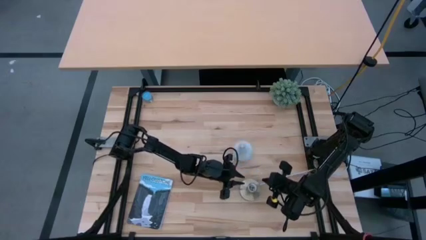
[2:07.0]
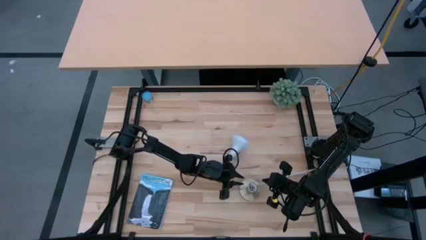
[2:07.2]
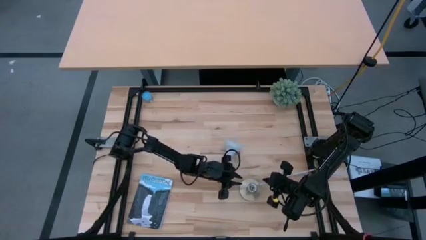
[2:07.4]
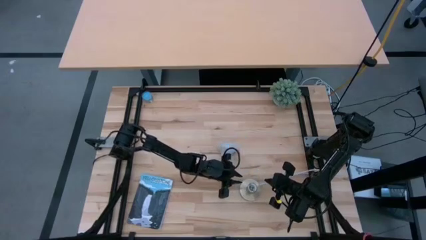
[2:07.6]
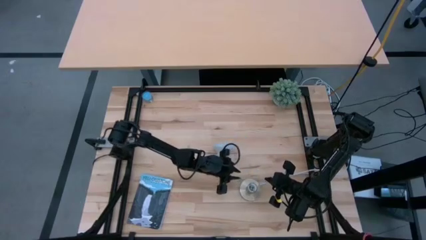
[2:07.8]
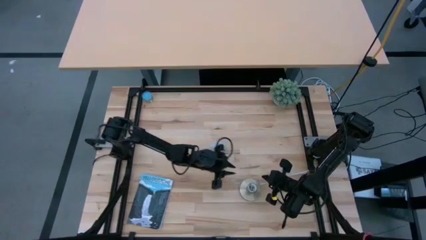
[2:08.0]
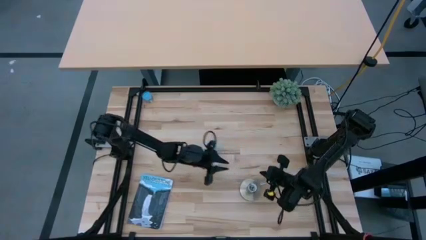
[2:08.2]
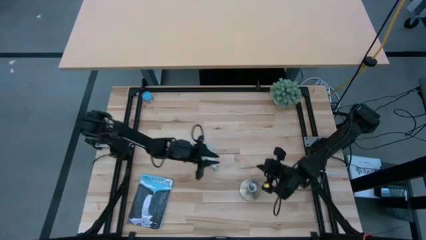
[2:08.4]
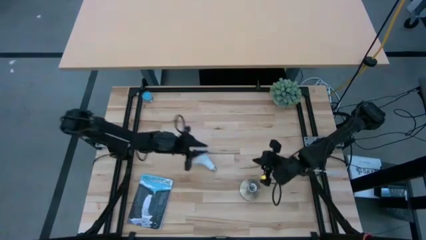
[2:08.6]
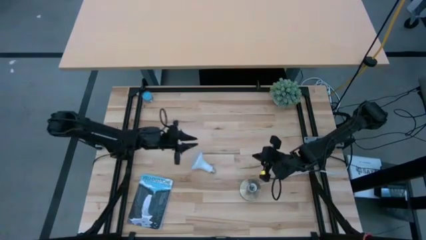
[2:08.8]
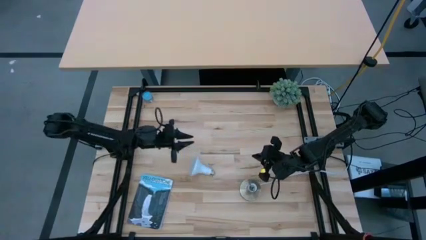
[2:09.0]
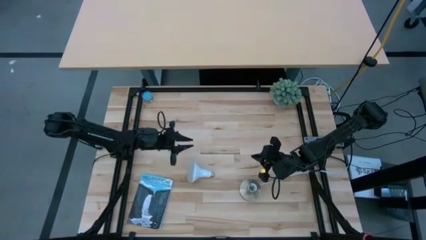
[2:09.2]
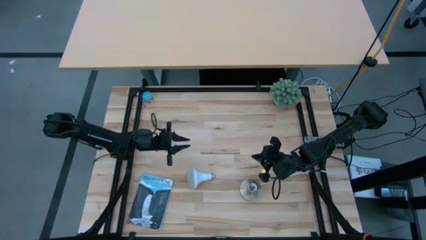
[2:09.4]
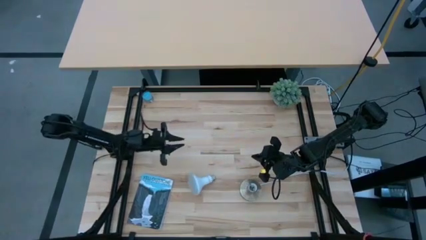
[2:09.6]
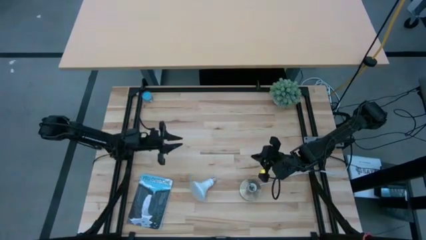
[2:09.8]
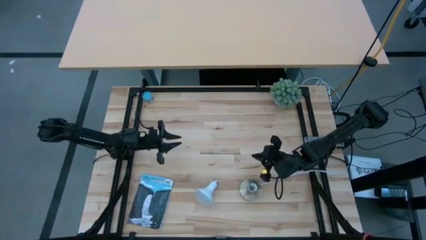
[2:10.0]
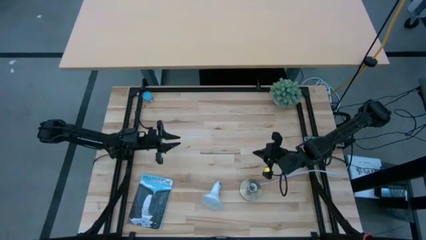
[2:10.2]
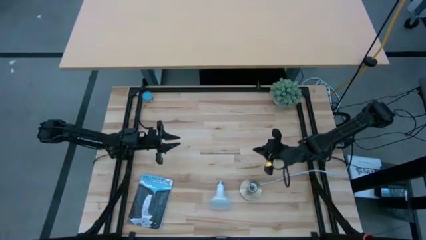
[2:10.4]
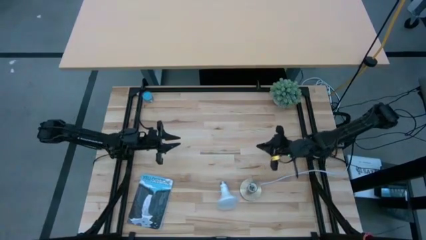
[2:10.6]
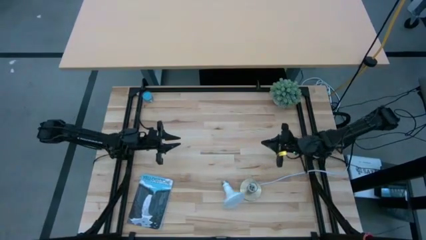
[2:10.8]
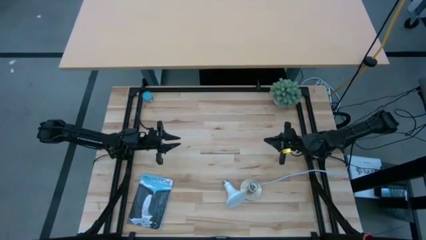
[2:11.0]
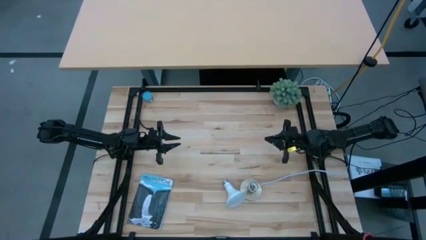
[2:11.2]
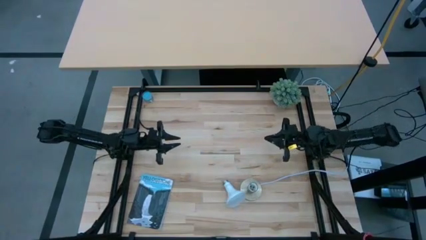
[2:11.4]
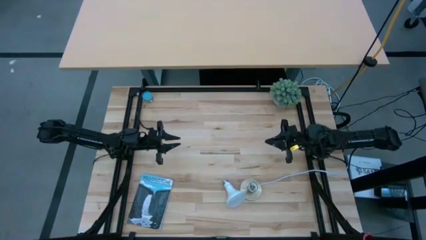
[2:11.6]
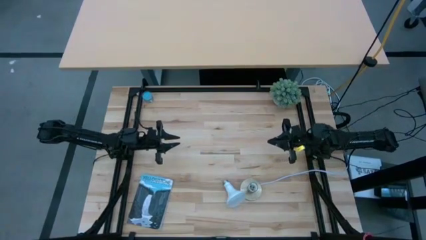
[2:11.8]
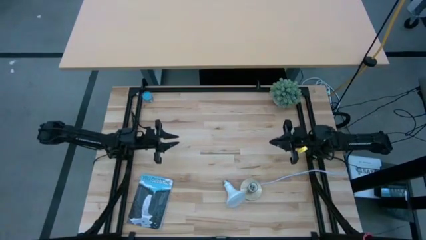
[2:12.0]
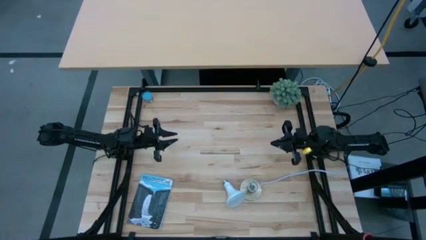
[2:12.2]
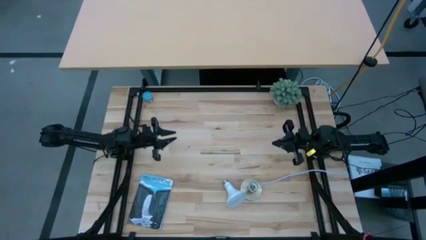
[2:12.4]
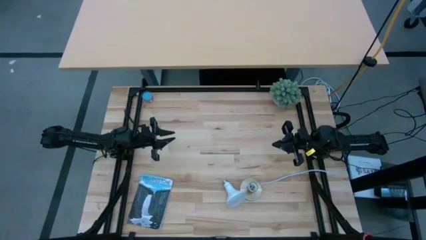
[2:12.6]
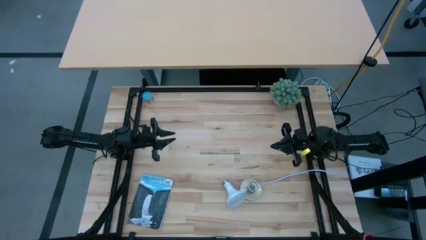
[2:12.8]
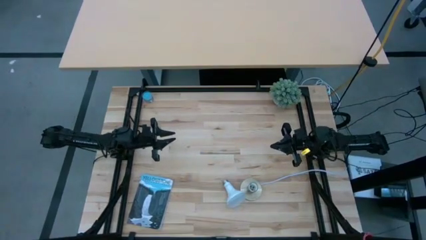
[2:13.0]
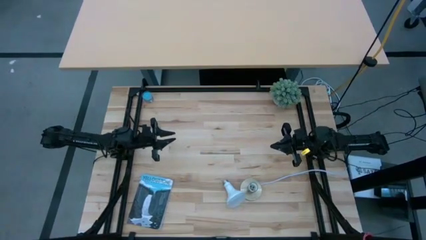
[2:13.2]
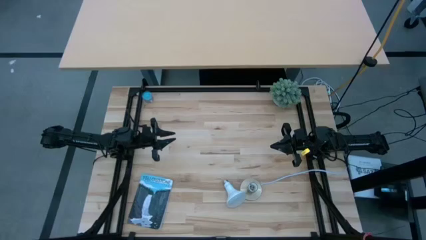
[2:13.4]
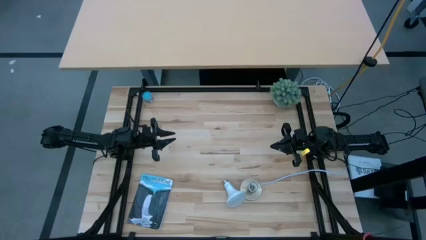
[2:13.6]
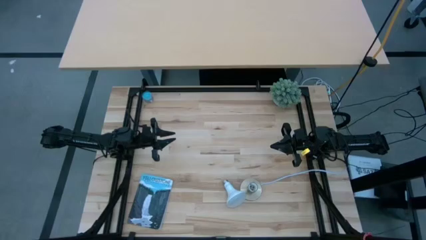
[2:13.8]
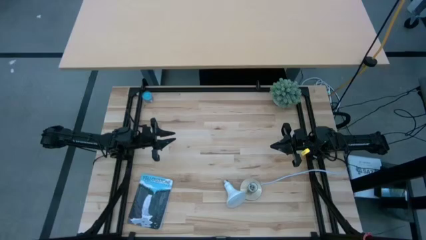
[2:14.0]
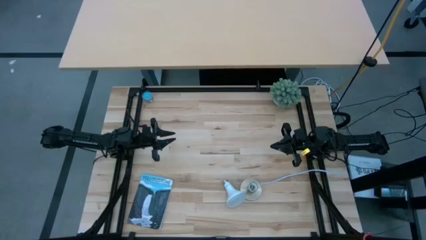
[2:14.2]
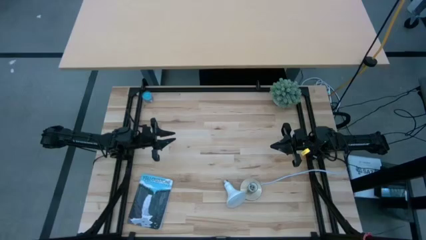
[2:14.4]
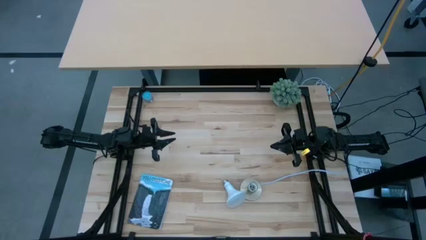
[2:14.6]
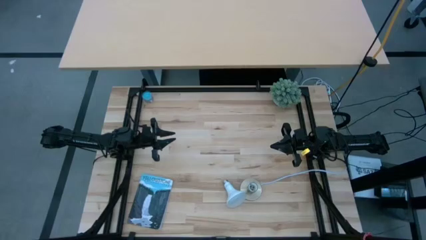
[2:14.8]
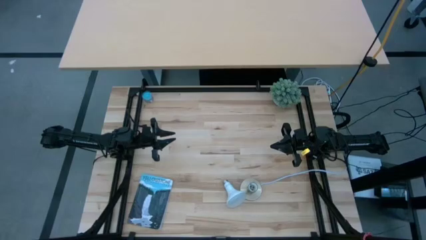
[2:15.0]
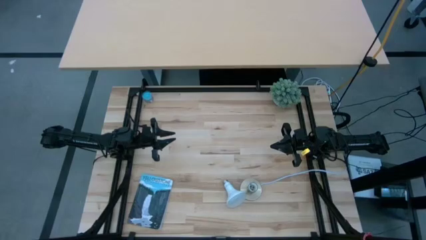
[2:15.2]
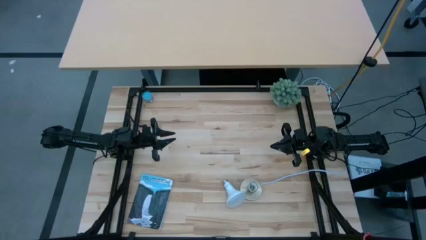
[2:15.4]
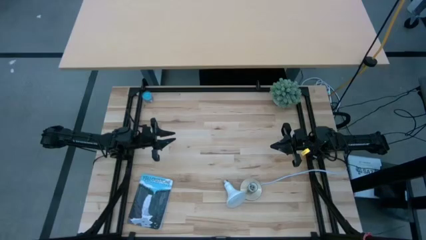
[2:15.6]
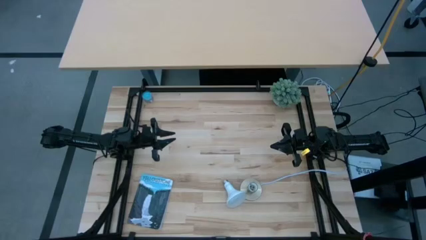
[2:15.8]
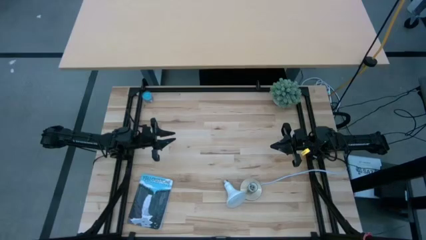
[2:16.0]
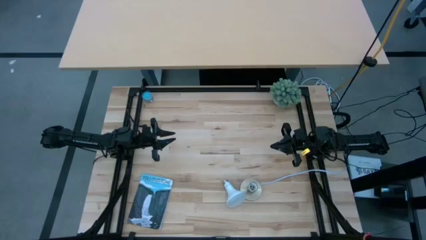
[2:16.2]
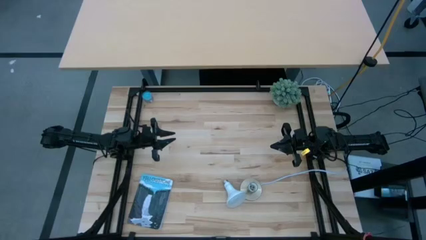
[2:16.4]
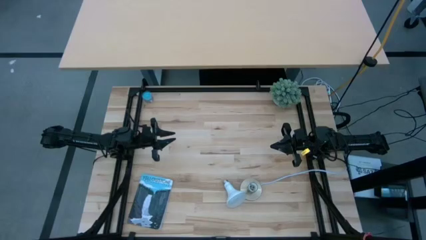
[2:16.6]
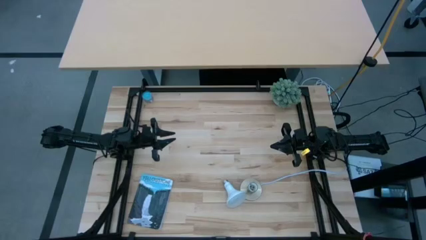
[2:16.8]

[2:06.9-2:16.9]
Task: Screw lightbulb
Return to Home Position

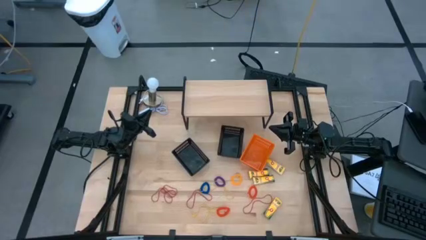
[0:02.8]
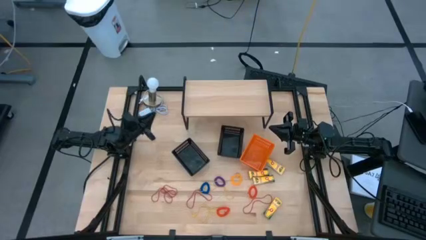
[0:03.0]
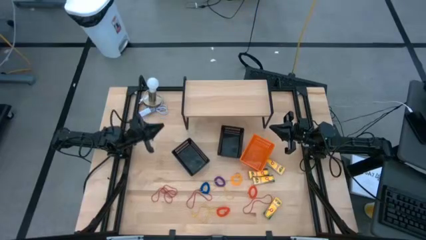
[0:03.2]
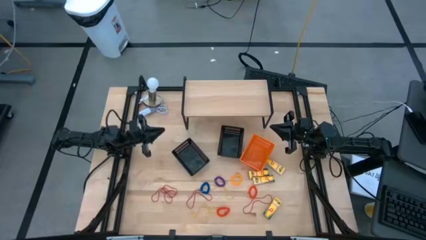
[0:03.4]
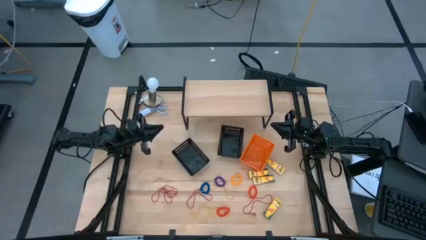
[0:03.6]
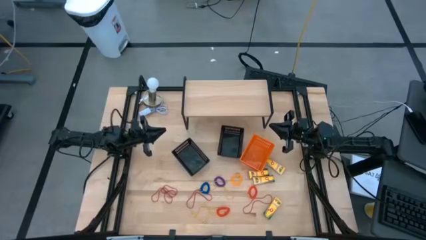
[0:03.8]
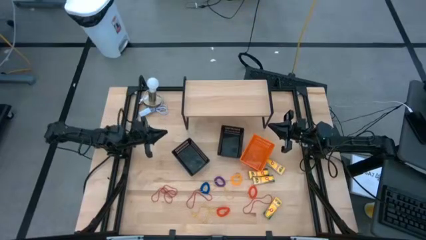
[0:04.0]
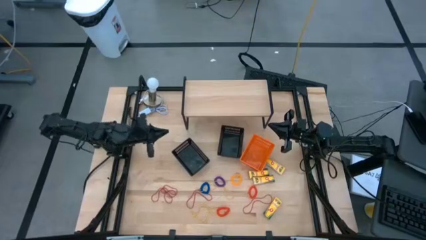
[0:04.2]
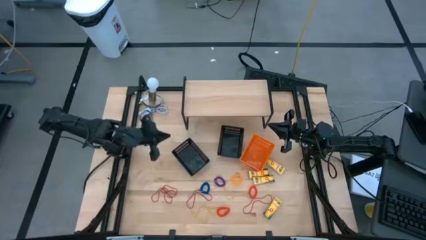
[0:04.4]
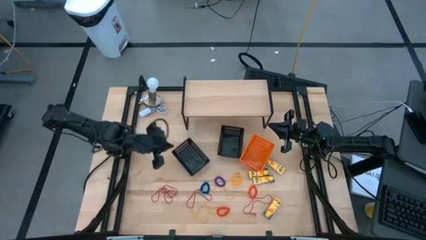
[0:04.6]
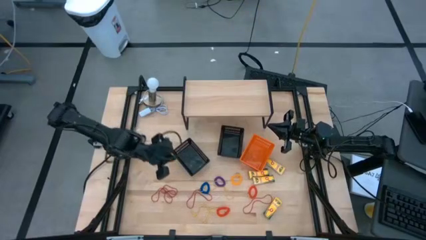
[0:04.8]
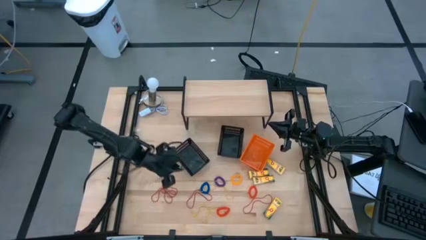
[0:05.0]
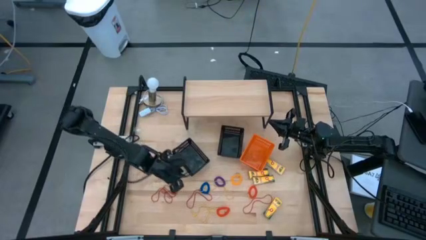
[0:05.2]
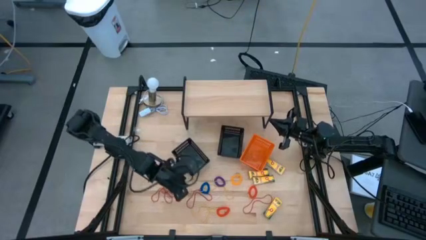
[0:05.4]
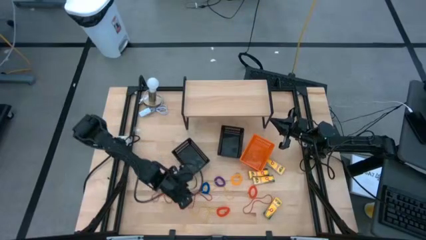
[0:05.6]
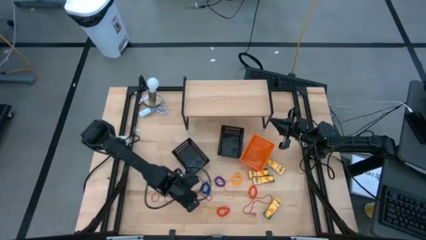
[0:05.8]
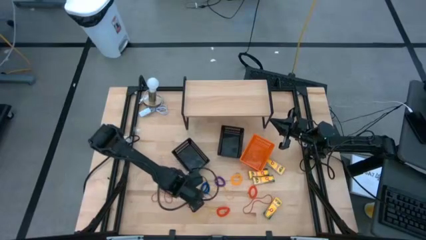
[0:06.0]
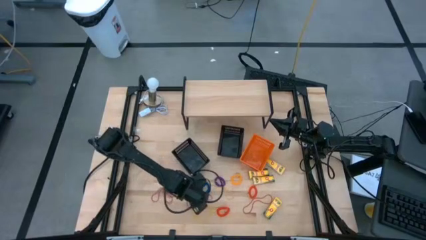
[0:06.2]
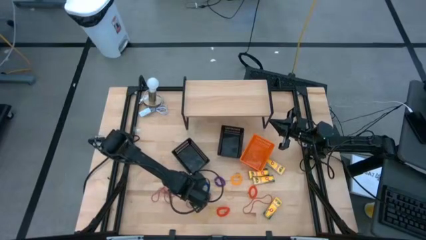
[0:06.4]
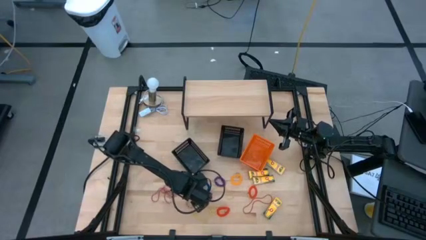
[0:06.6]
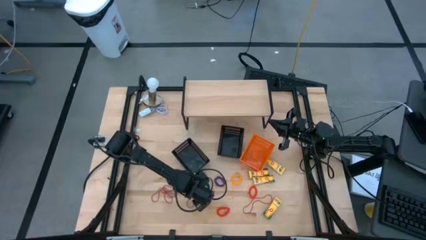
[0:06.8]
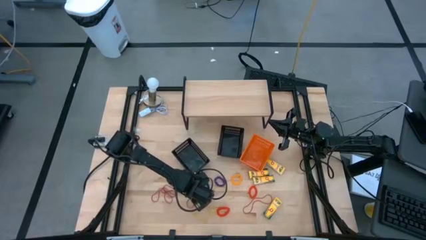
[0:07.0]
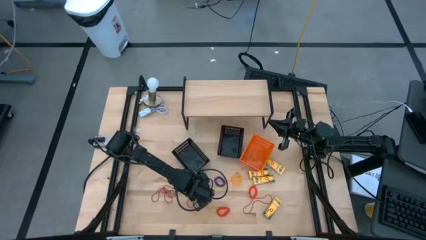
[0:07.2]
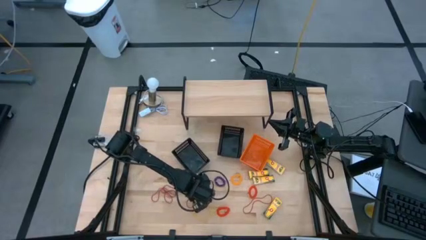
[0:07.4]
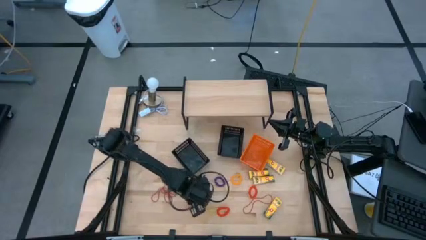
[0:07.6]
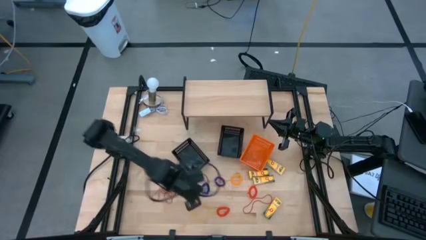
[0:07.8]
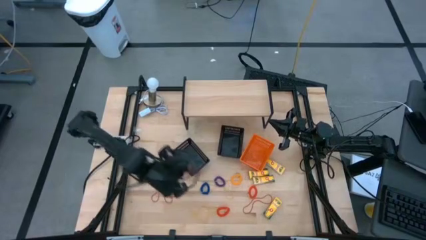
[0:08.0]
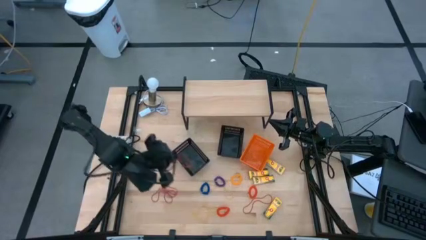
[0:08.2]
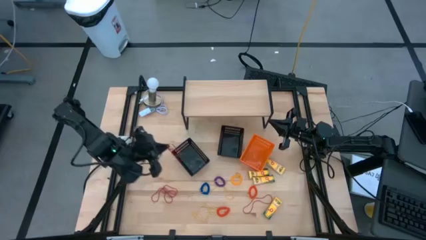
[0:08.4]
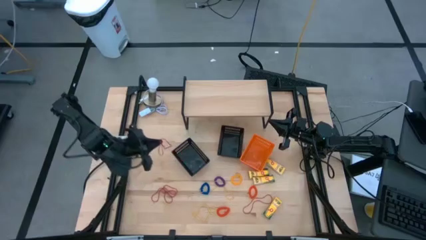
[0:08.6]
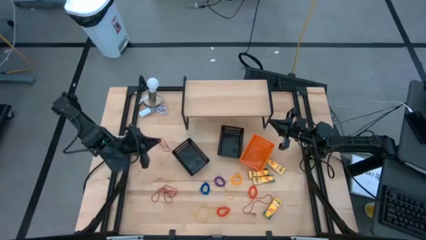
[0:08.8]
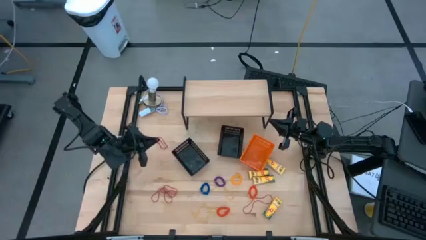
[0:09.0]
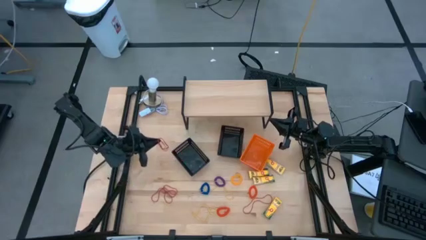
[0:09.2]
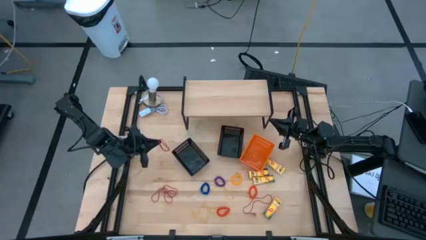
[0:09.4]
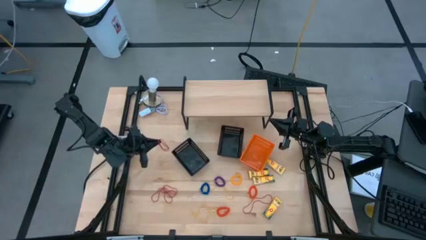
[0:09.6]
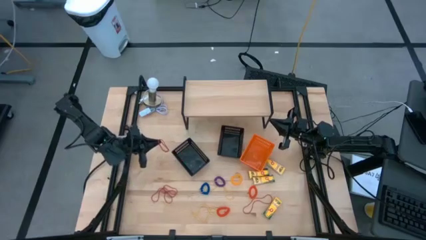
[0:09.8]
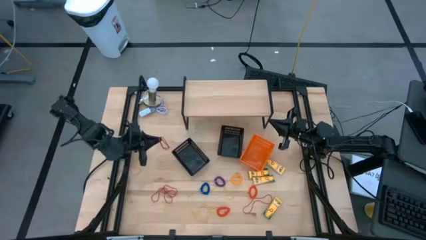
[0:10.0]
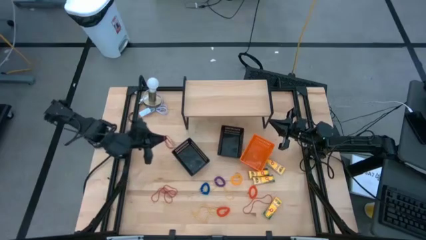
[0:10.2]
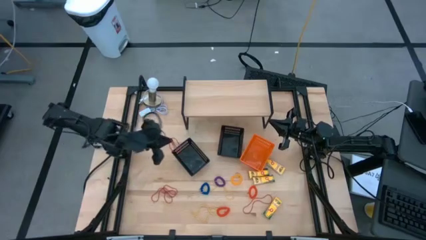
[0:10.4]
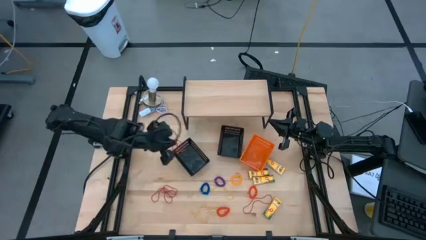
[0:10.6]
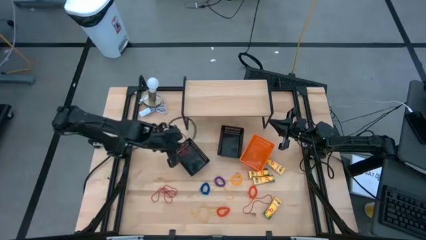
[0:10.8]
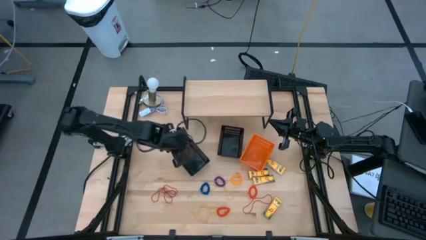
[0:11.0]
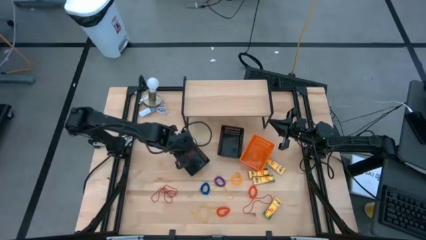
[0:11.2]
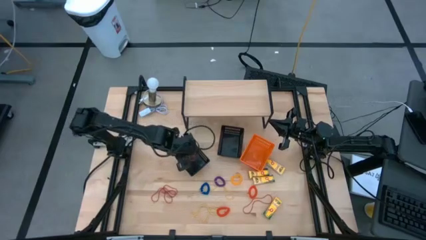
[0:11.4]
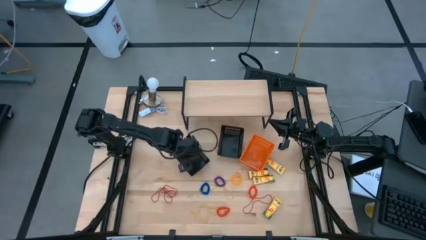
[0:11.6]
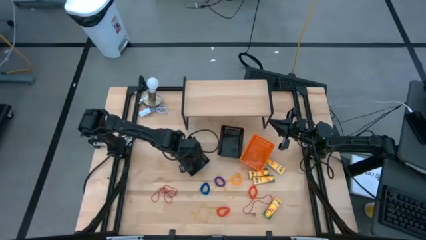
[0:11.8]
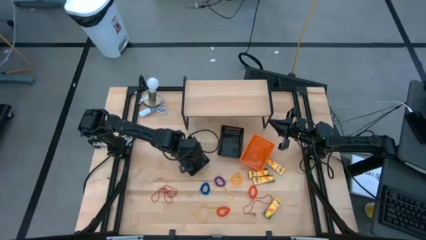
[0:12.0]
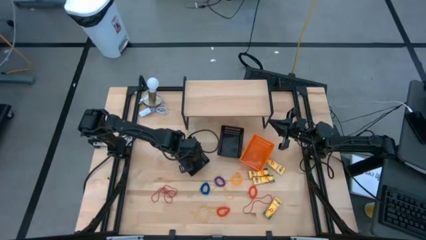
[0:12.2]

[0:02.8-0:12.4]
Task: Pick & Place Office Desk Supplies
Put the red rubber band into the left black bin
